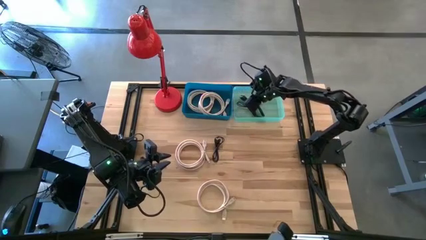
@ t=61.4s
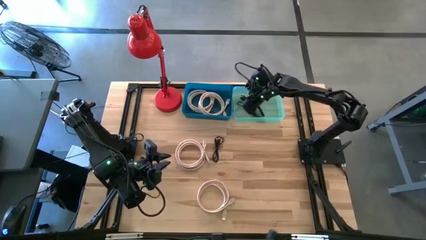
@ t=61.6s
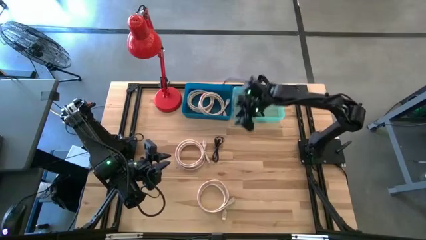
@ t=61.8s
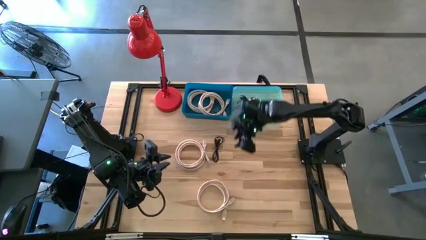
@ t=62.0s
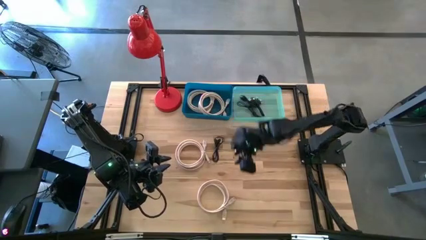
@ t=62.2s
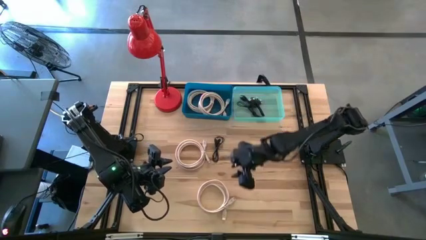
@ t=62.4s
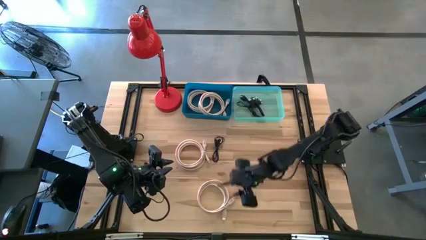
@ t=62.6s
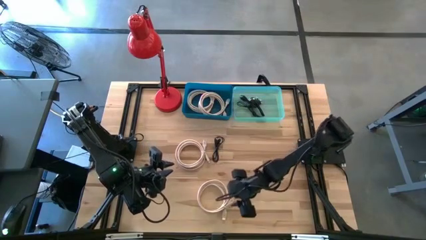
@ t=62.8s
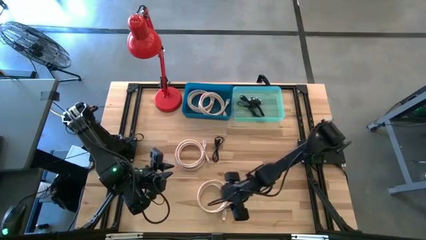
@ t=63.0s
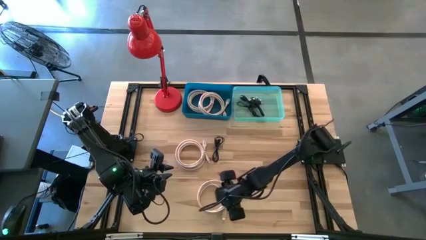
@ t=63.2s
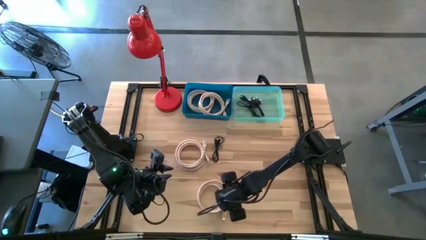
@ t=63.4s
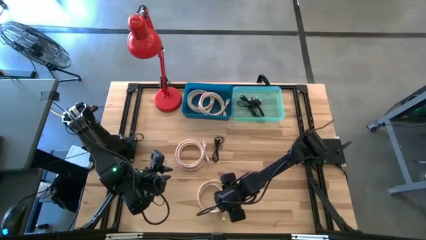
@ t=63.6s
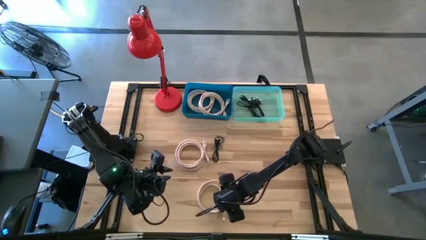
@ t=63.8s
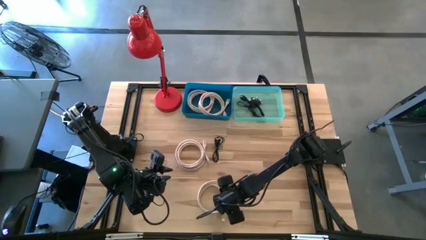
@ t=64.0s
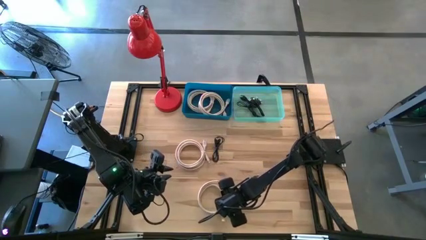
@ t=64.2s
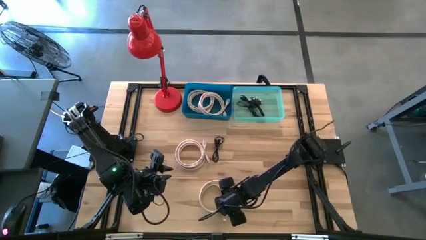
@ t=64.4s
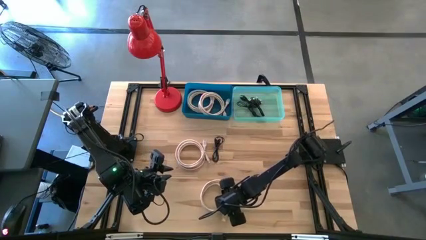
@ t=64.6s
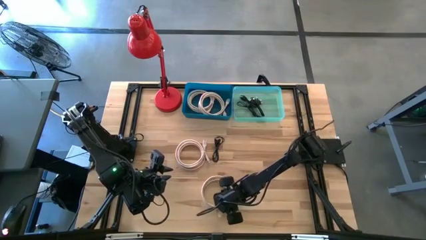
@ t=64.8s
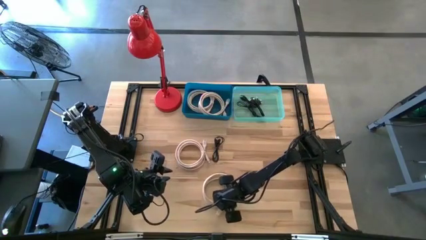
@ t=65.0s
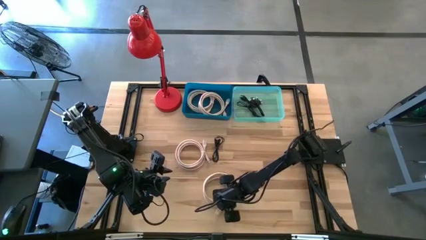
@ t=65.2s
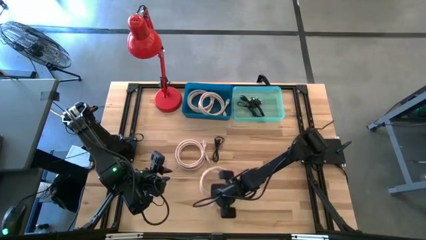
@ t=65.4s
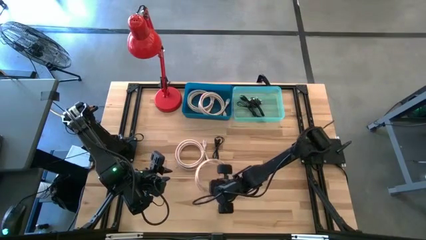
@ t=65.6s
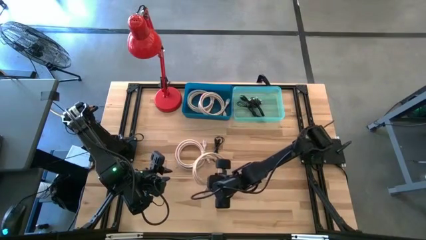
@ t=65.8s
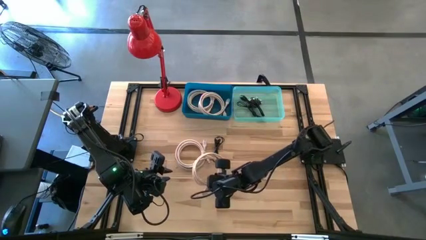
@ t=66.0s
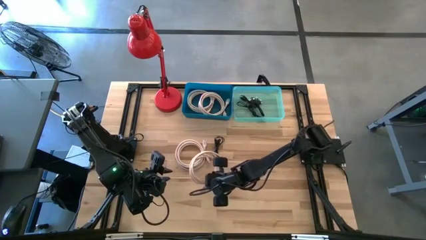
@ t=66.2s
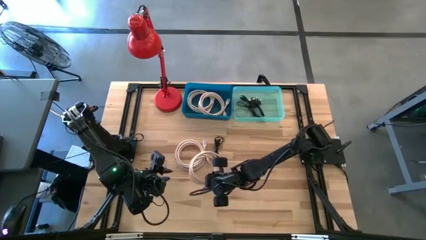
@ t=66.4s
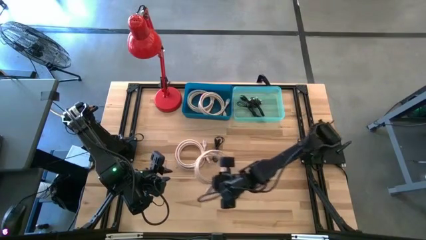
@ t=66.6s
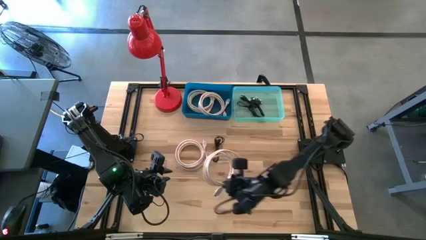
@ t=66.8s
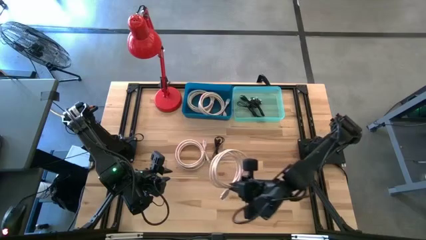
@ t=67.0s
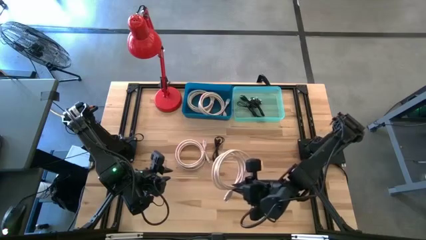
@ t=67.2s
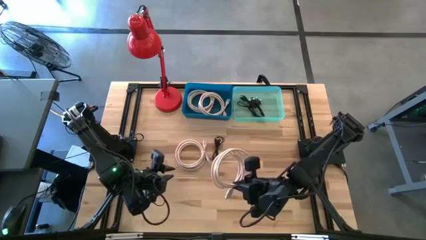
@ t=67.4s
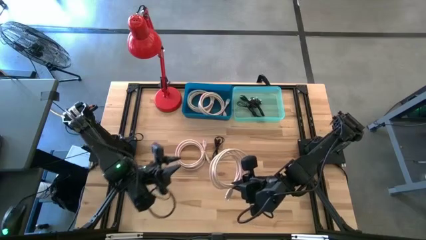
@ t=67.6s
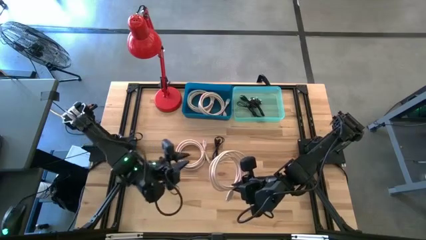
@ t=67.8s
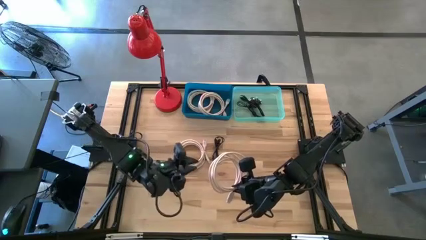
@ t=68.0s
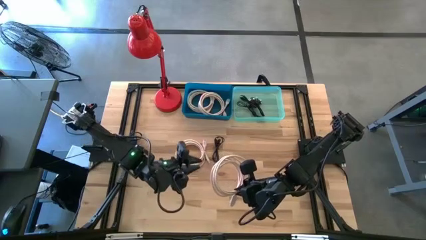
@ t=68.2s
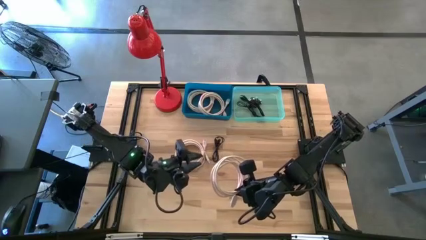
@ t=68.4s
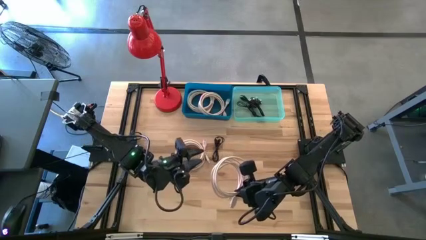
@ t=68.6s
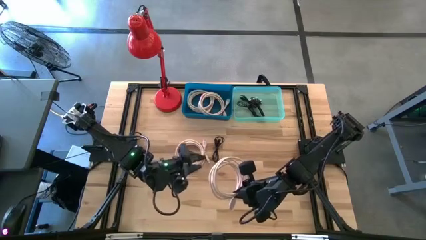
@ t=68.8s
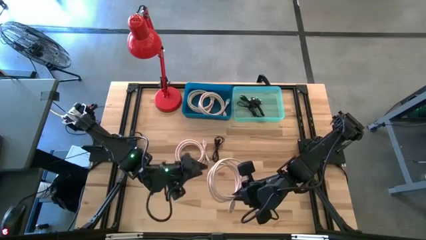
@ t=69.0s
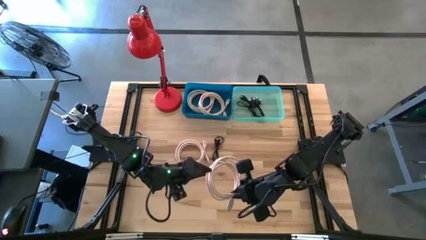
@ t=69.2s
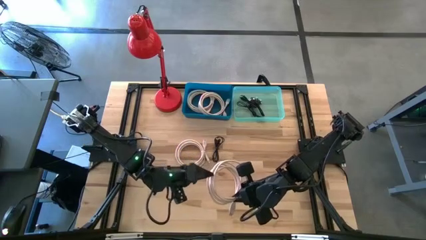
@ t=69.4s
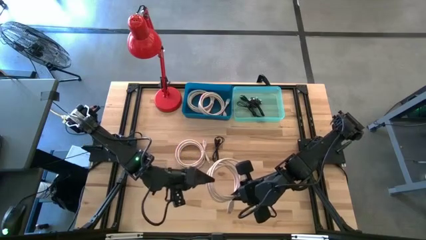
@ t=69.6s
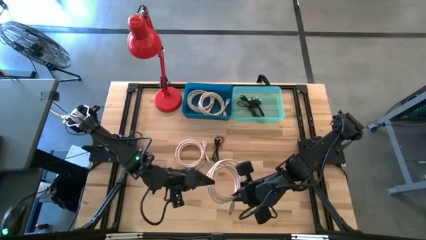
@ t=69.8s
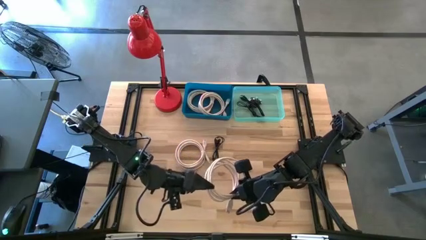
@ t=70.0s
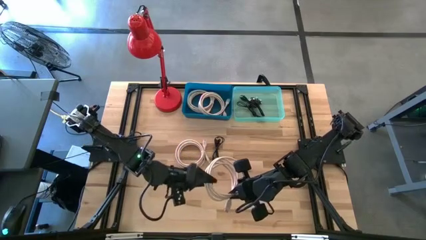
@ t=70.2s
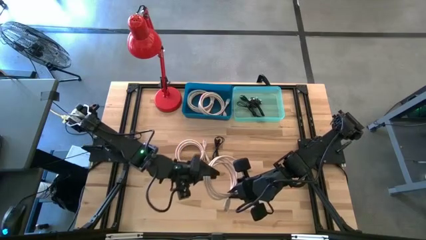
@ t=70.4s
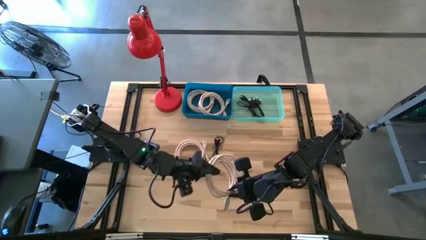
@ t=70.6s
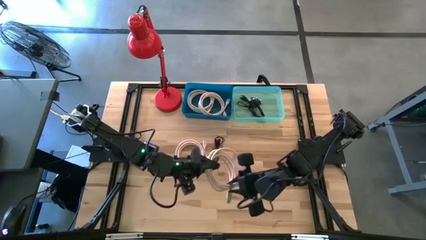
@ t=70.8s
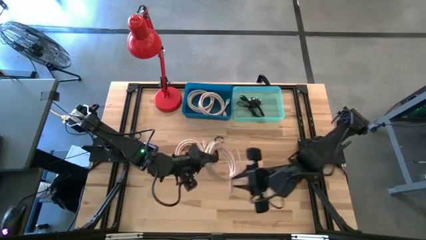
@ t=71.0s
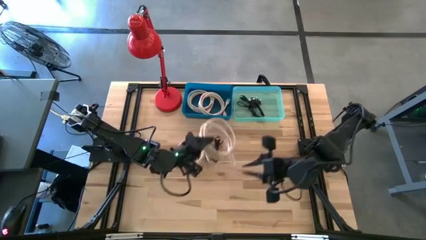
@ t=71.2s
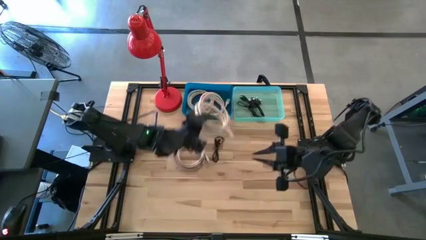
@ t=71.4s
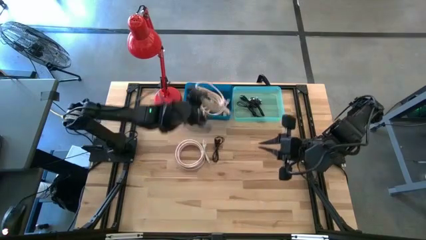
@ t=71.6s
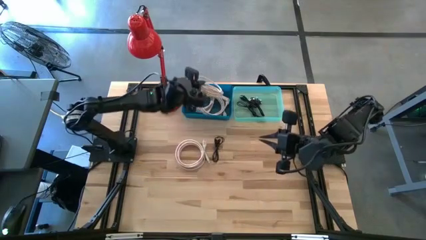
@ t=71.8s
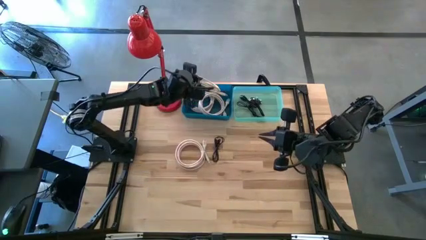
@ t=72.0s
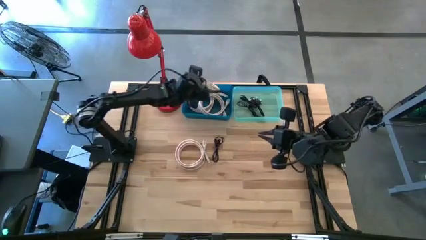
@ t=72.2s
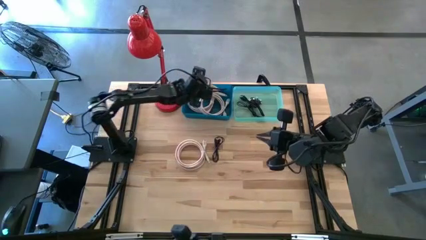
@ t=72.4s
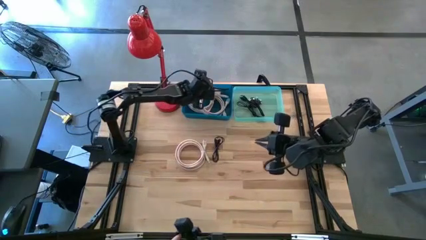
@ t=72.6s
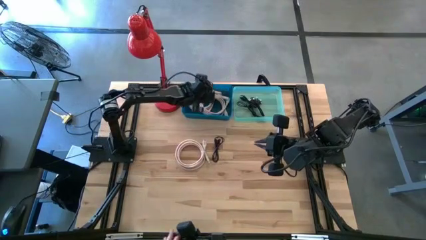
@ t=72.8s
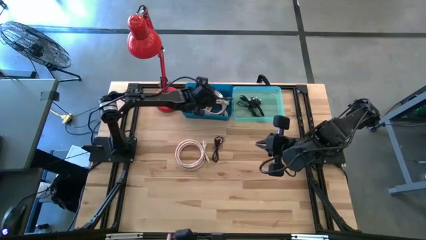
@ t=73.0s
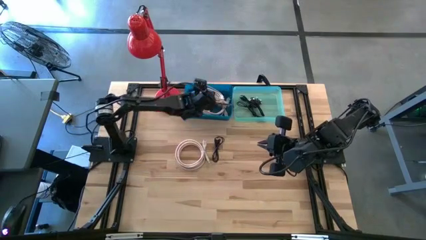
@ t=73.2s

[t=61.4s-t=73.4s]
Task: Pick & Place USB Port
Put the brown charger cable into the blue bin
